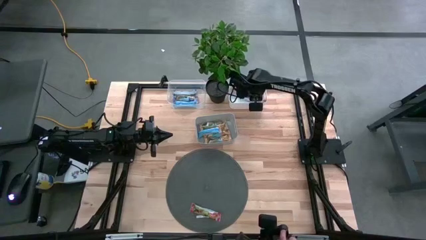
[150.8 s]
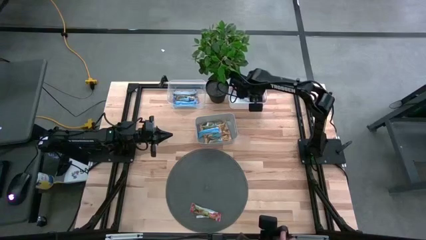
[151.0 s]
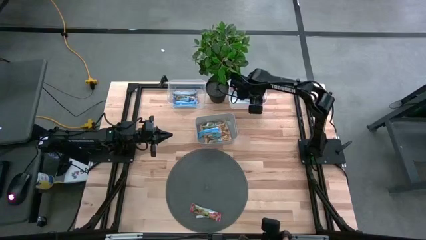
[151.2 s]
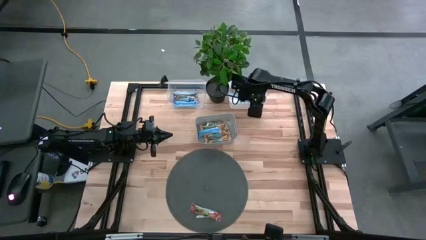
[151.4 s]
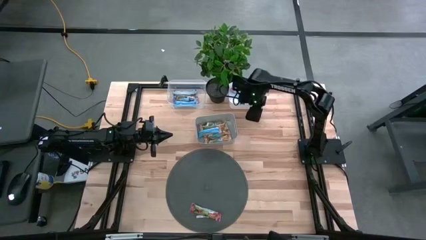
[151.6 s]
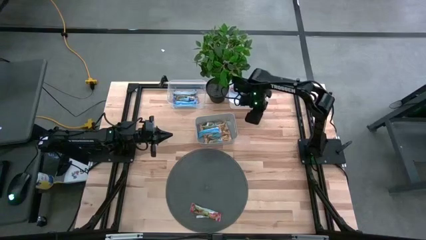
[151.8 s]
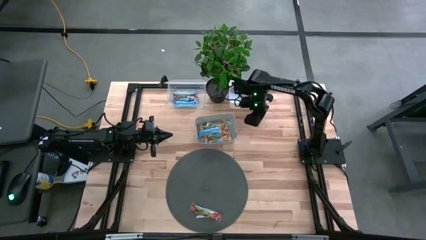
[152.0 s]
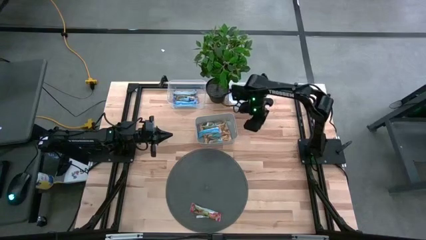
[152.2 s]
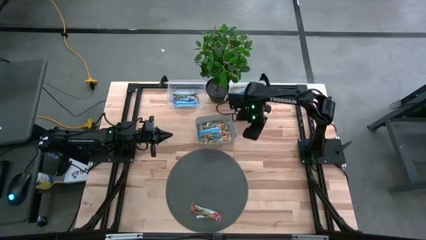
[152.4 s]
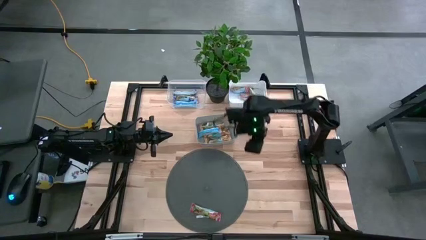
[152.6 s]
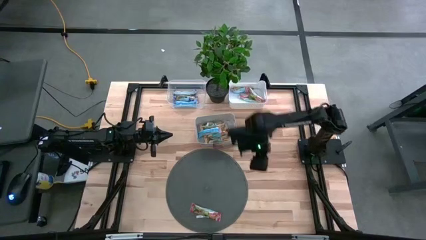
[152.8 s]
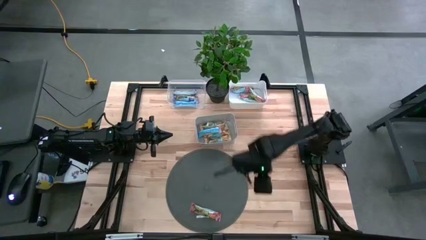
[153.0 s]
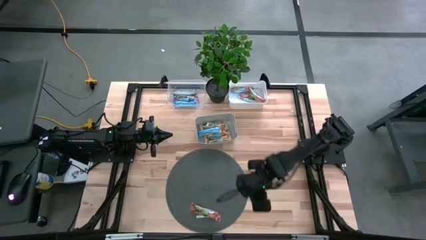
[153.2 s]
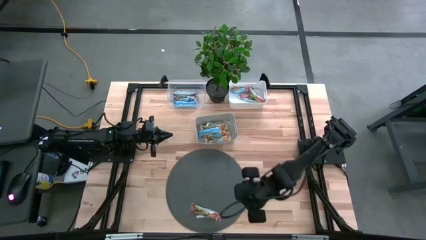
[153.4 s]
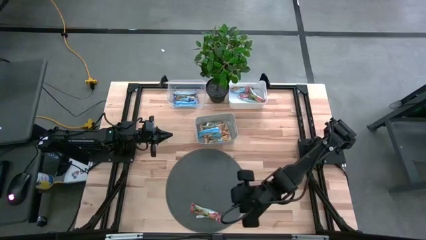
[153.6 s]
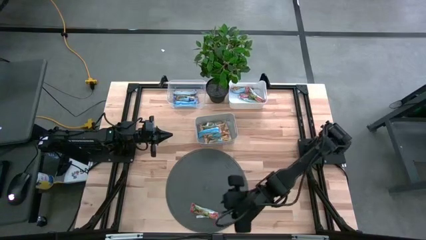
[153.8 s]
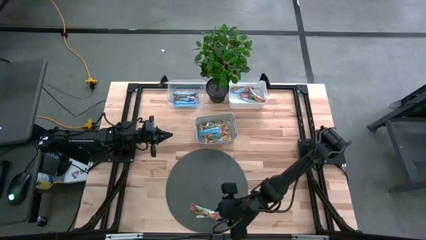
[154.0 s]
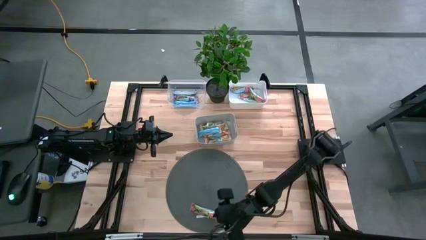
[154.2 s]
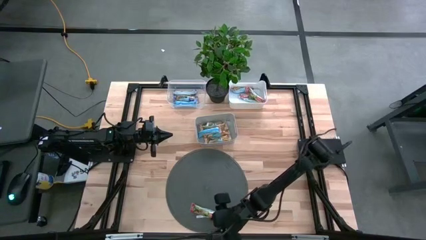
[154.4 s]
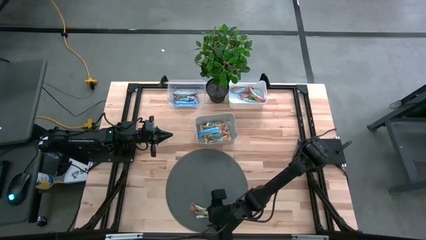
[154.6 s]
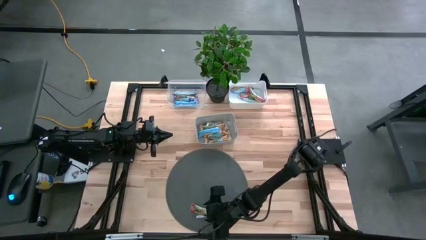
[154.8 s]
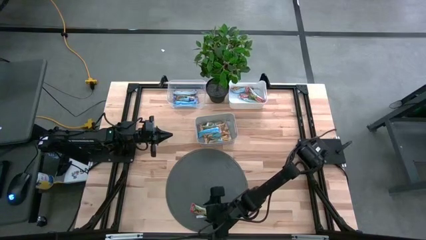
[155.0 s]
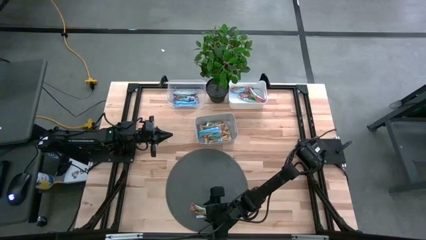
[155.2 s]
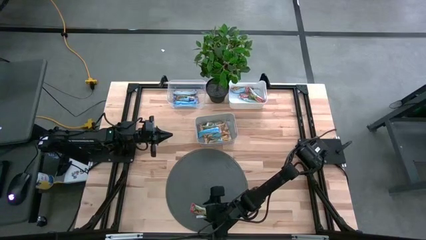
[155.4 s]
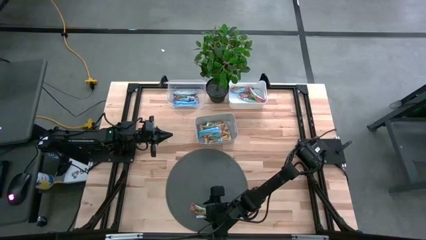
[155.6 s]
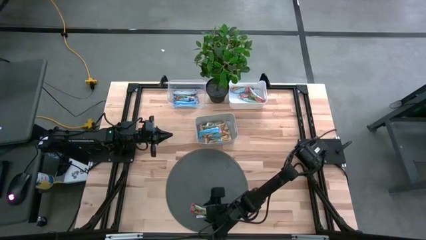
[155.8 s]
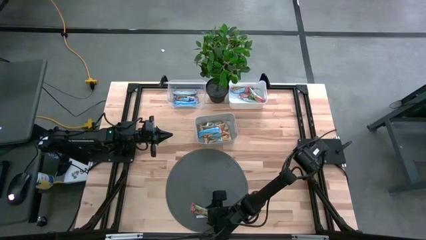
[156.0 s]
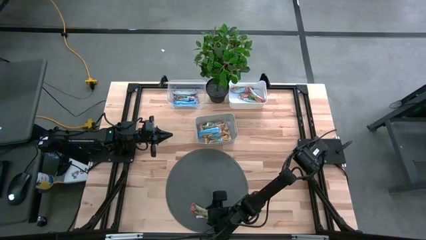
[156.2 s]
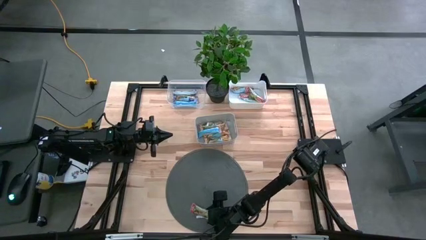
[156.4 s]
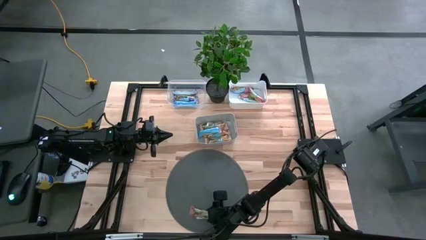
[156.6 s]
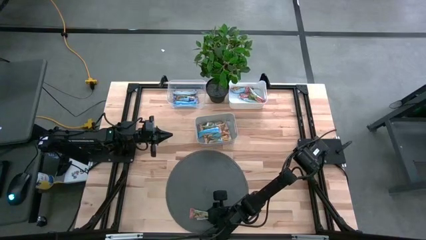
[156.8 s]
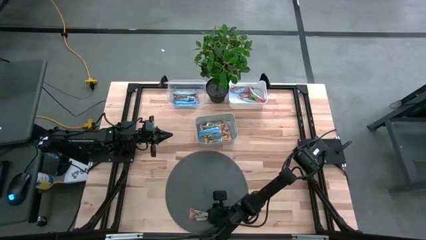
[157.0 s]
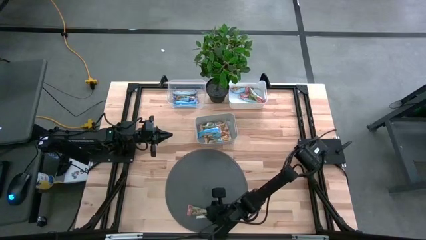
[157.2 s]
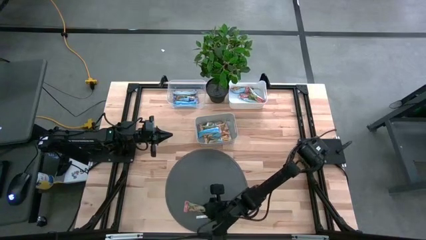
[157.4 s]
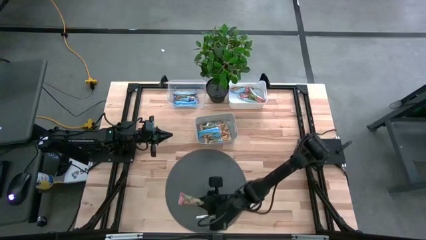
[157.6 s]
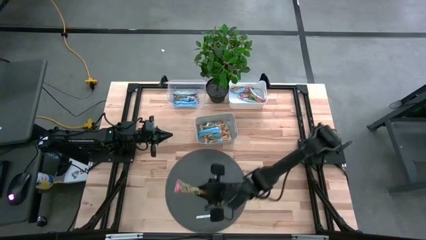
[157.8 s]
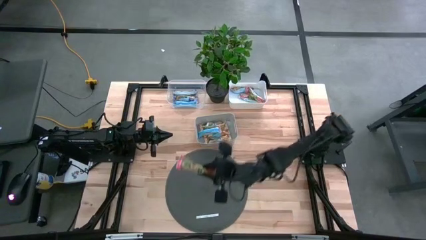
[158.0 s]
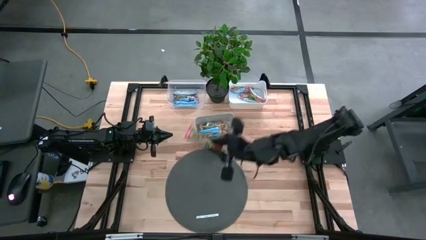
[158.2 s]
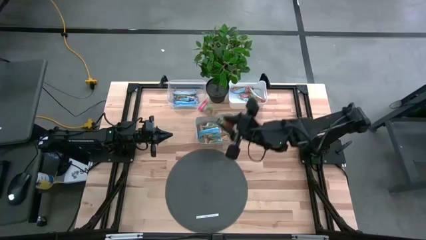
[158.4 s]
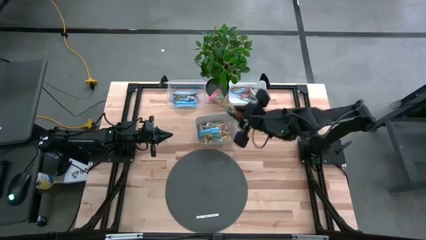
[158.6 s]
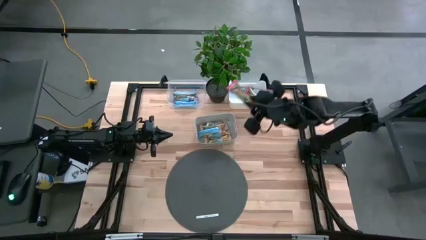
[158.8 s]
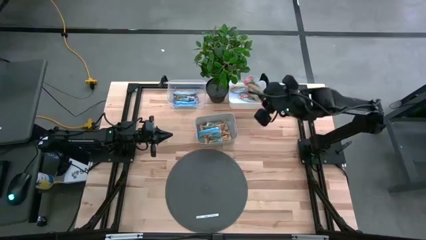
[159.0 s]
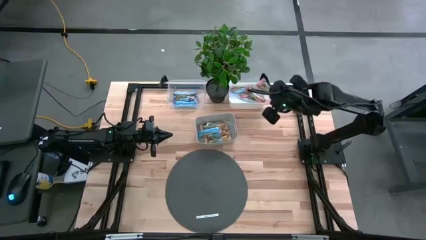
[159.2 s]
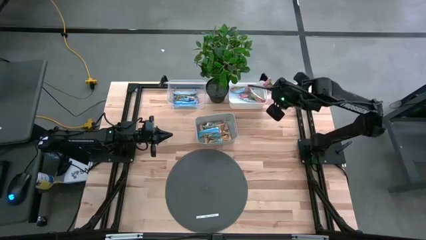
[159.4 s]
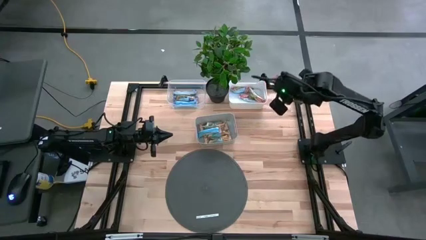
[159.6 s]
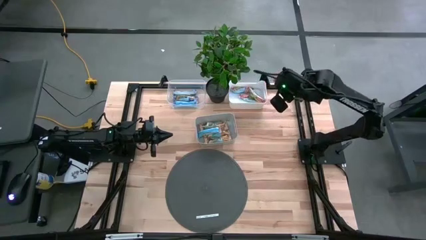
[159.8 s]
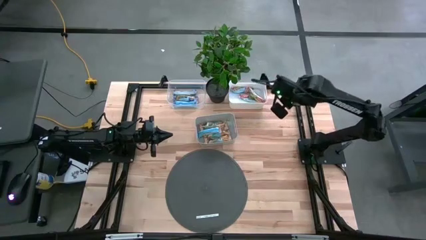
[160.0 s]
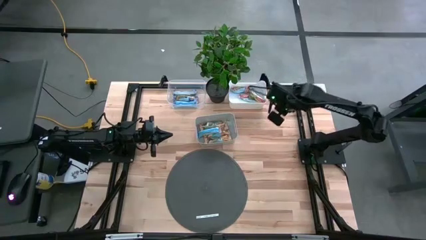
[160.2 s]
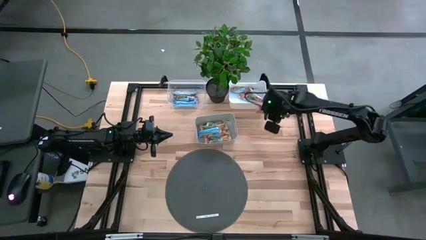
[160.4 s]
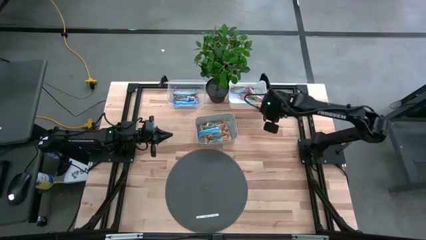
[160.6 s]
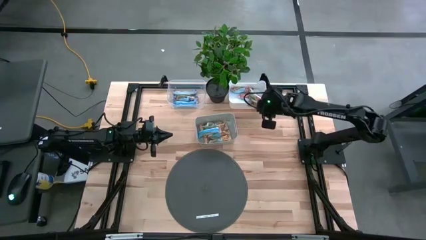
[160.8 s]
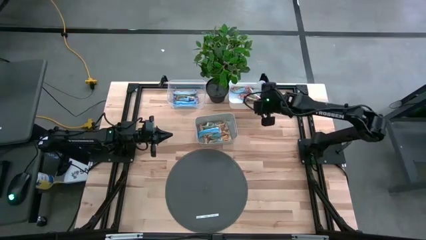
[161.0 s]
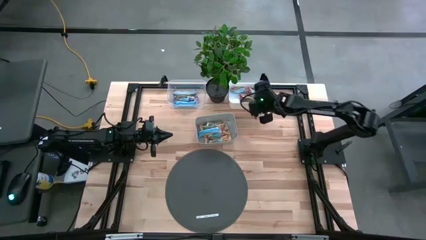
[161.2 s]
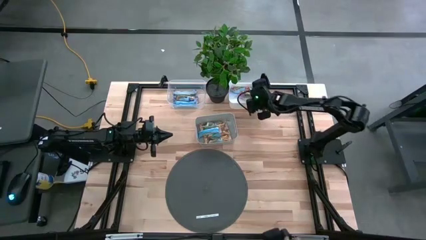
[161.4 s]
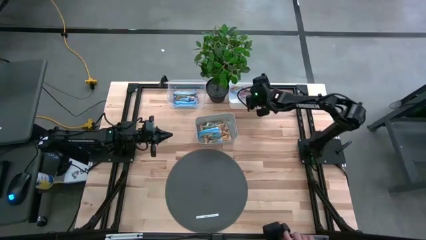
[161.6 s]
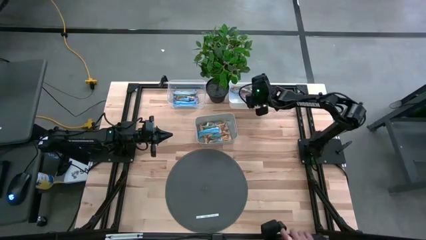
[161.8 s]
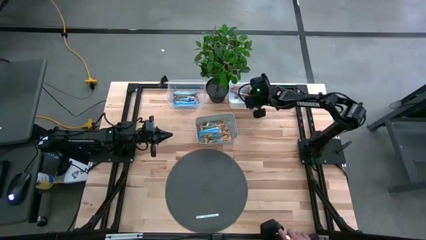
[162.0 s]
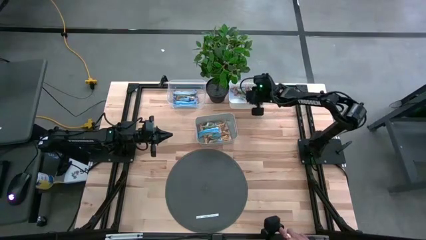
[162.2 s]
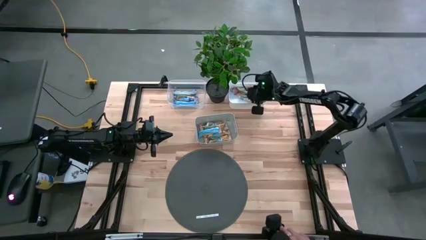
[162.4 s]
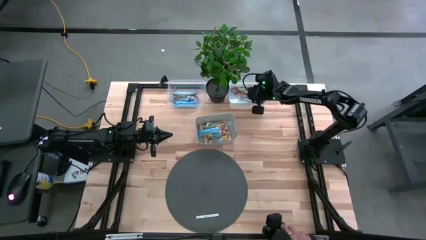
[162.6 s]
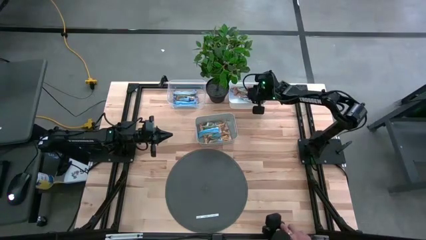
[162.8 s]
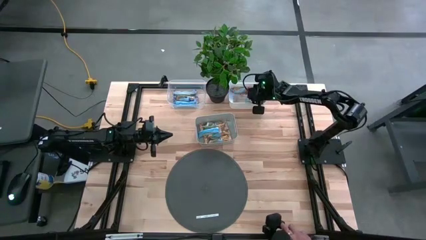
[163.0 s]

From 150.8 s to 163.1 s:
Task: Pick and place Granola Bars by type
Put the red granola bar into the white bin

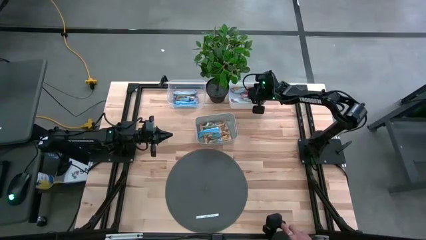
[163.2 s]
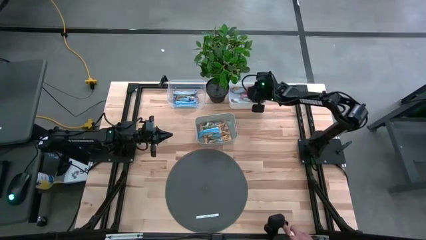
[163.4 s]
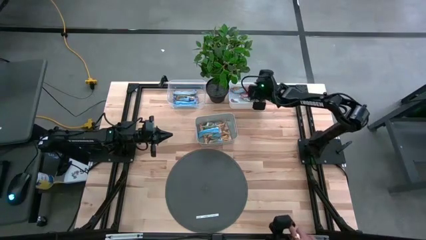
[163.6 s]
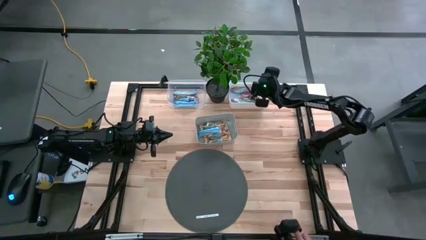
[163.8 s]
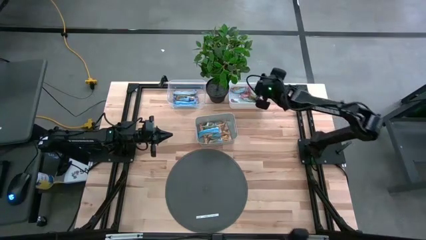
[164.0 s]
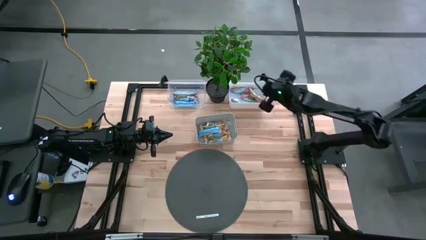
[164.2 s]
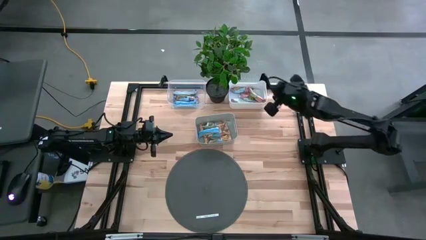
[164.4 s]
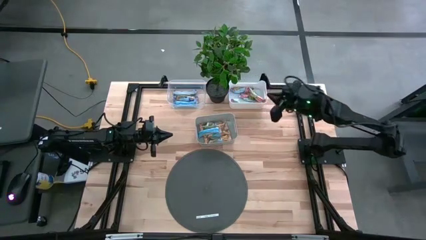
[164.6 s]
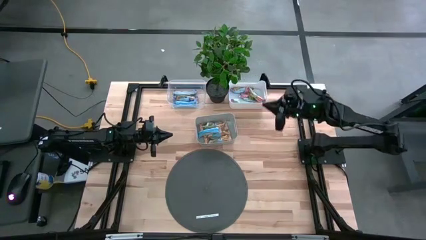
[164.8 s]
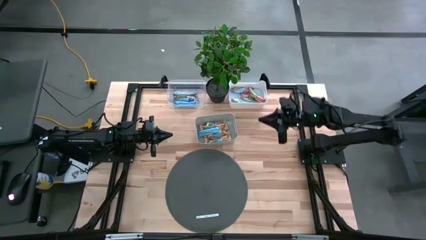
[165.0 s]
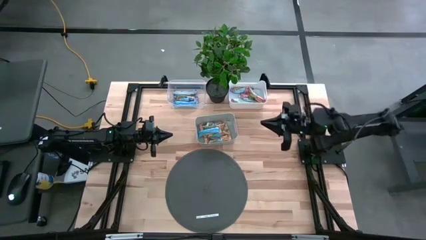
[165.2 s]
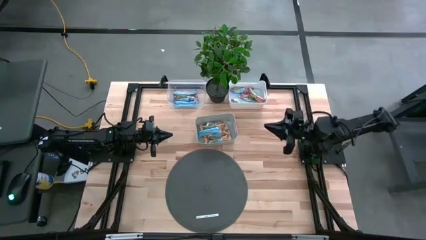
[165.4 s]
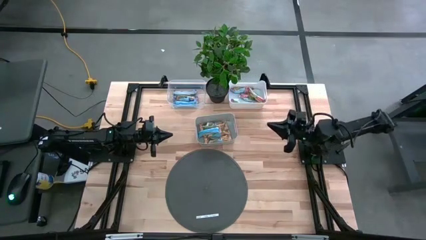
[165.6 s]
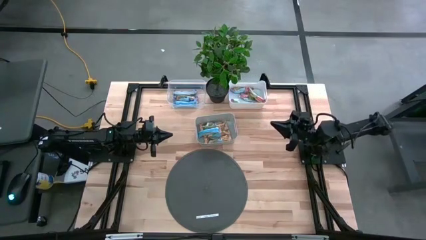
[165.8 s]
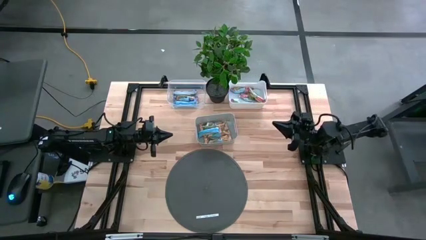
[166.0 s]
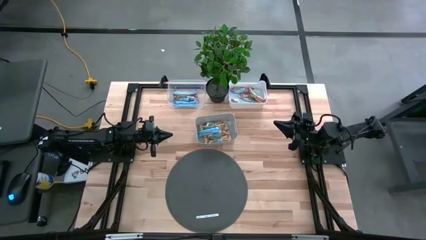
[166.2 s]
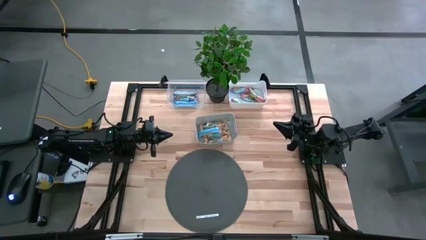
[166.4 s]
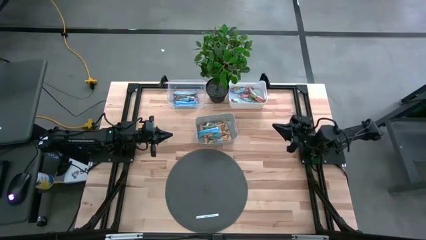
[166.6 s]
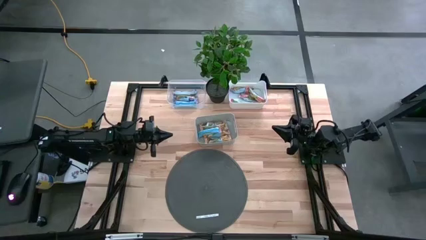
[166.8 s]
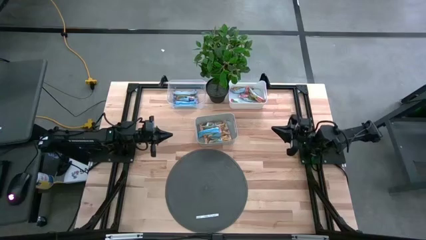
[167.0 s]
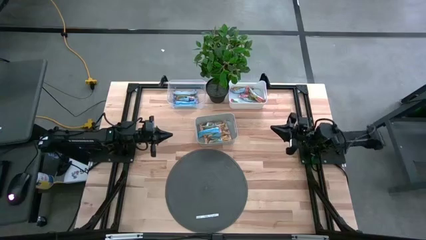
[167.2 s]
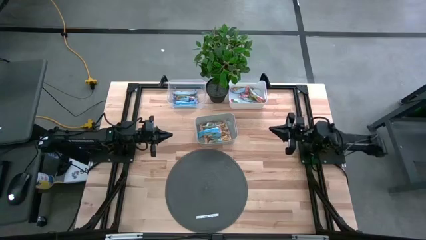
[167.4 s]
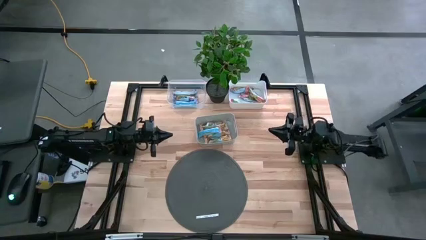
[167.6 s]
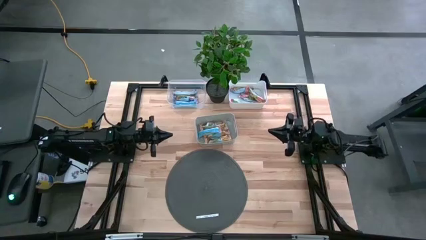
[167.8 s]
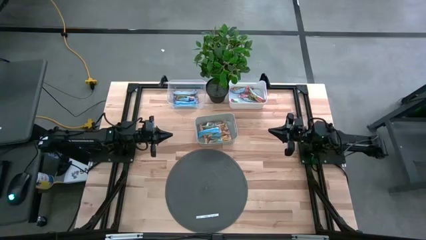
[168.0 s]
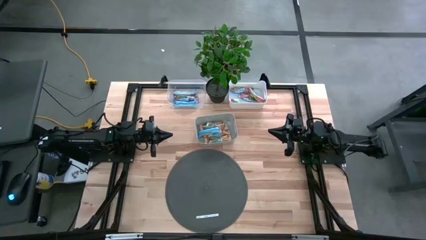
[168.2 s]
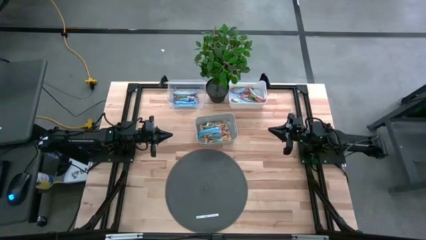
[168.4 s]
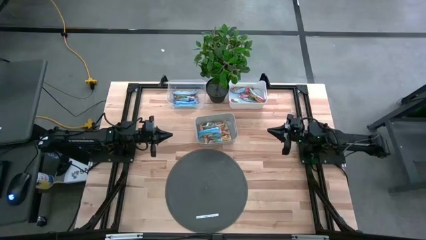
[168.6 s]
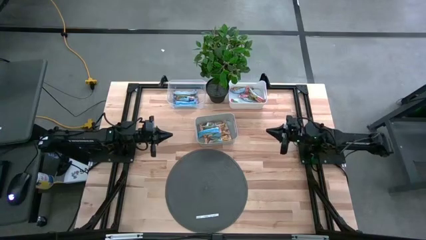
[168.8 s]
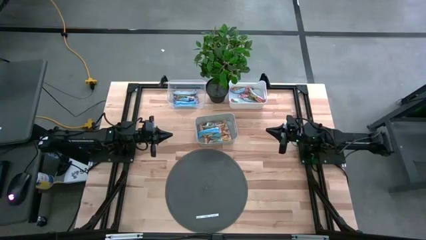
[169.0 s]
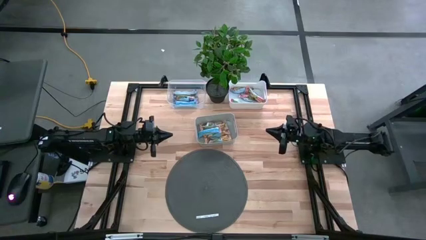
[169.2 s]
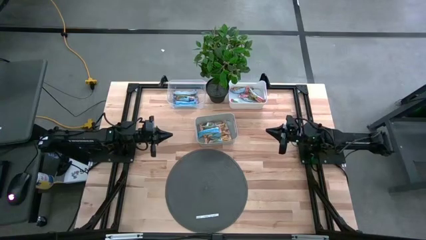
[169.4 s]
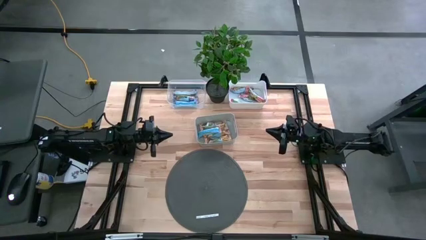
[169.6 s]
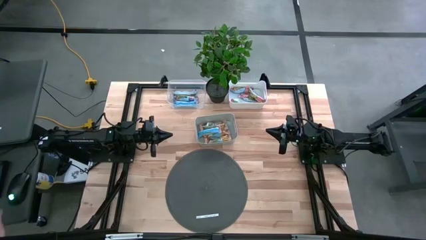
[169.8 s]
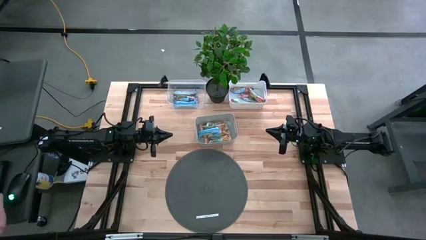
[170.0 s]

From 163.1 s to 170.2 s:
Return to Home Position
